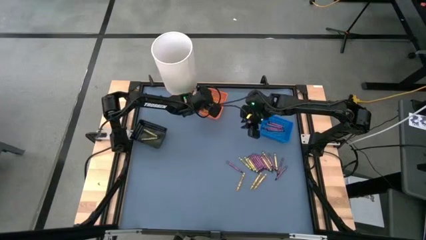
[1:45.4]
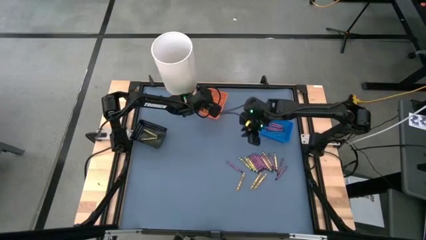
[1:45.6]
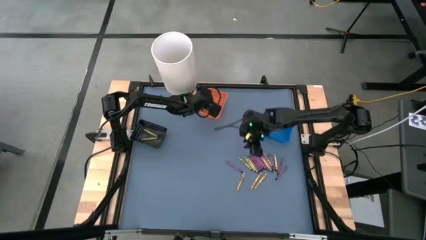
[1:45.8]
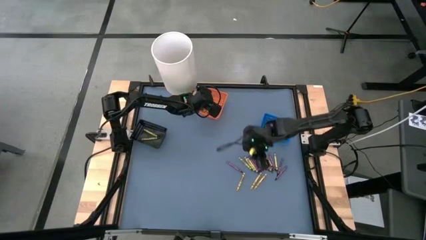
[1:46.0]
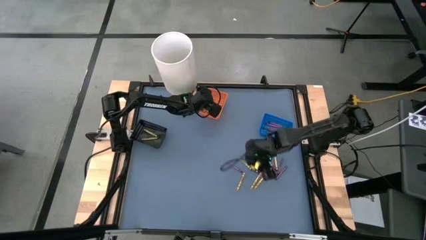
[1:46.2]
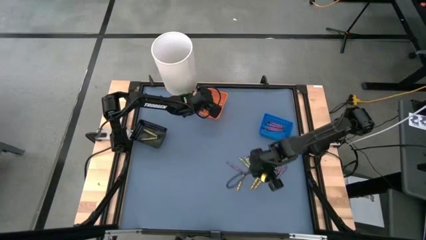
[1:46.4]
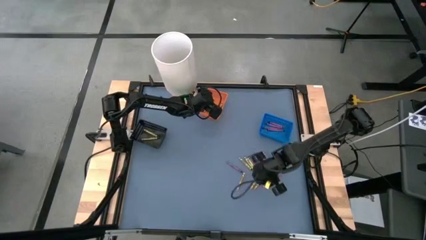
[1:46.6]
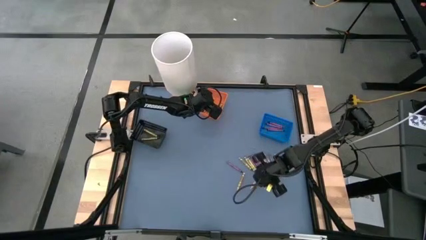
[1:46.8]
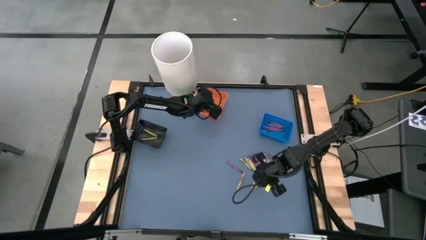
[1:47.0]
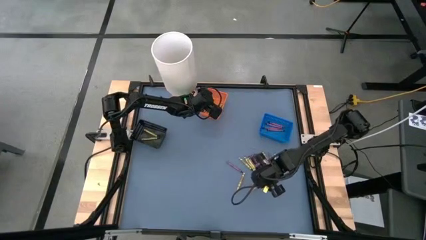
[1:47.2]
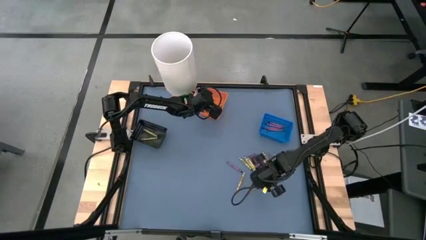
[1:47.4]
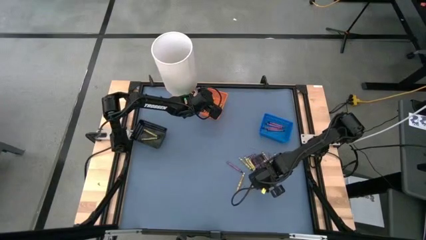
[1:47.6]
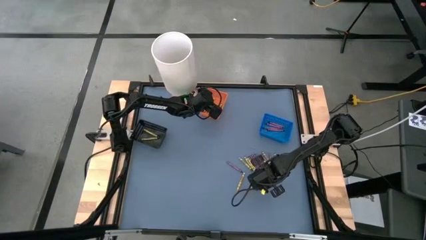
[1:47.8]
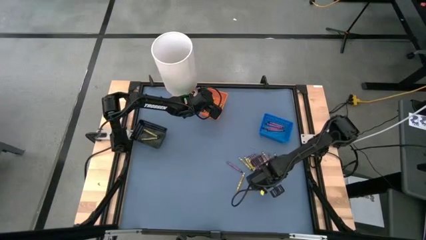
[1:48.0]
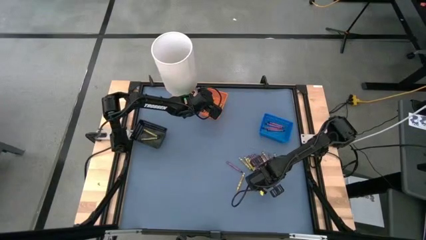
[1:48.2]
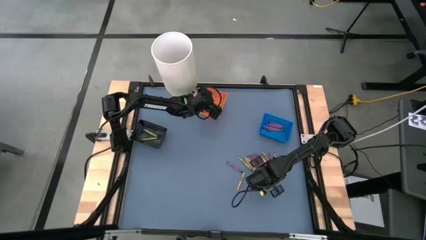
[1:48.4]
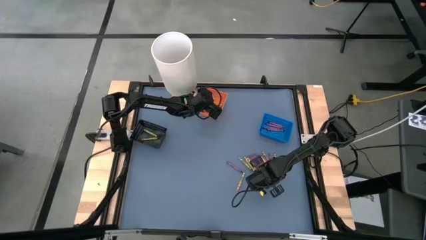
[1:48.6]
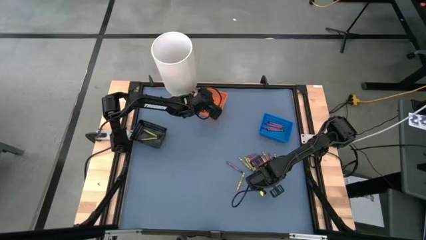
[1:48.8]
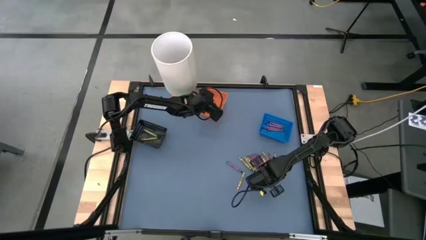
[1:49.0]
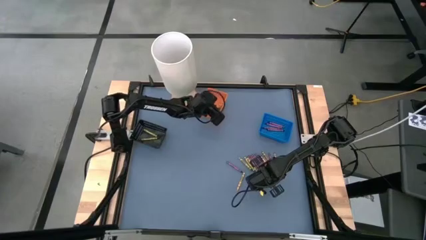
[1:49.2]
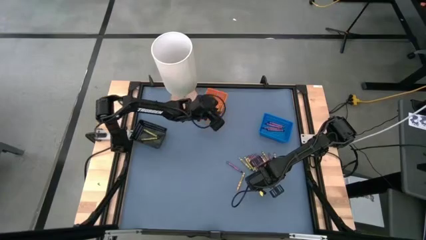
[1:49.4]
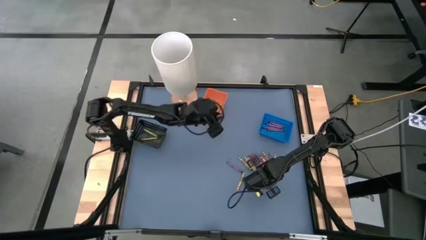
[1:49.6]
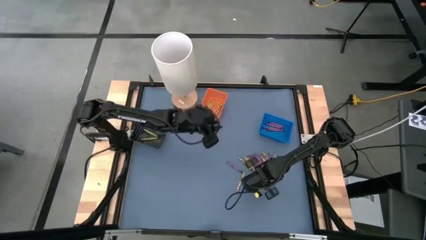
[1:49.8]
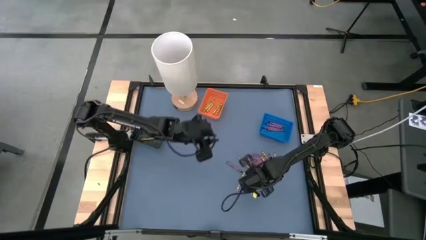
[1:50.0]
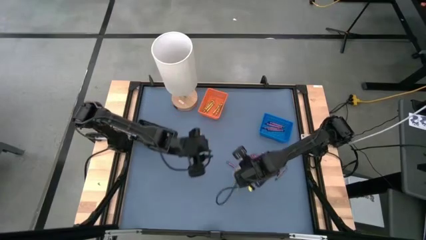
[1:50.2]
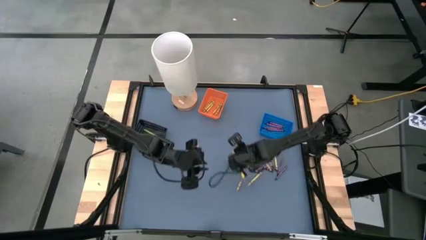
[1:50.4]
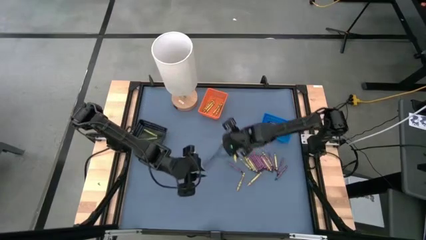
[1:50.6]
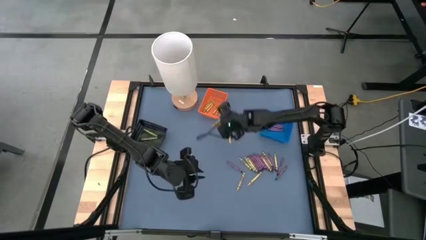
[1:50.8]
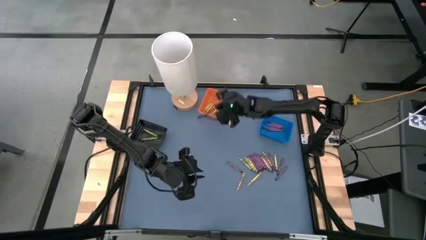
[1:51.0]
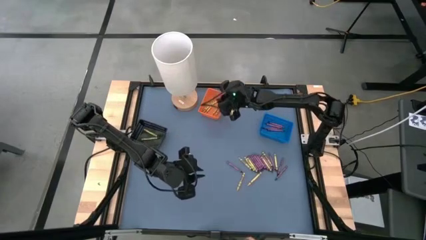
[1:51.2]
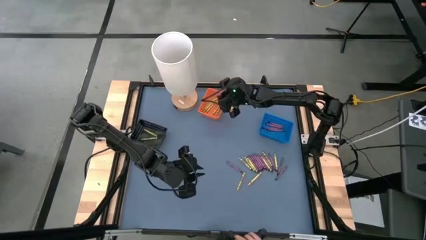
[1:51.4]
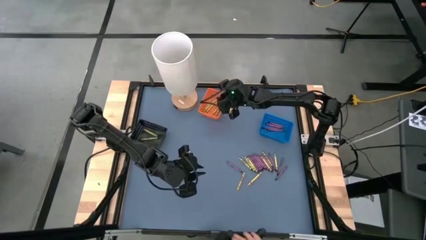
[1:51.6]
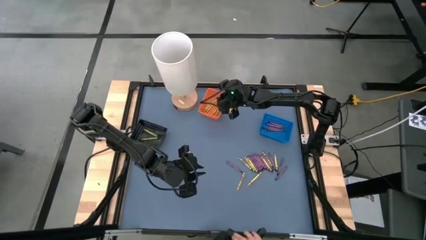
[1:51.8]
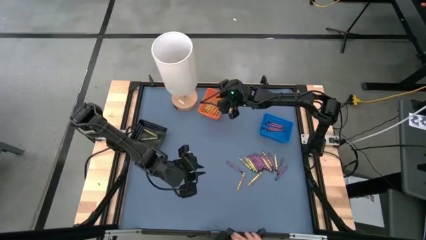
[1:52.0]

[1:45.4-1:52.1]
Task: Sort crayons
Put the yellow crayon into the orange basket

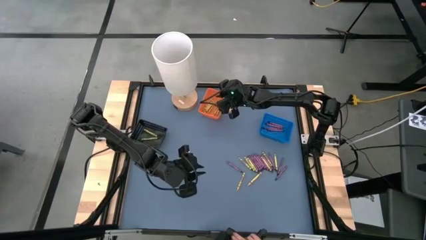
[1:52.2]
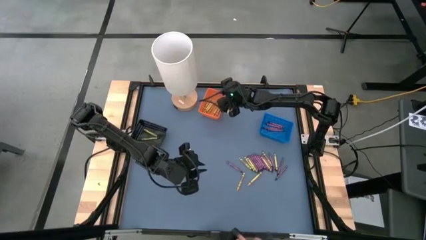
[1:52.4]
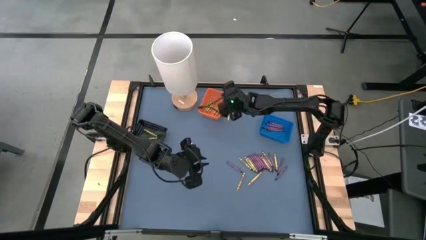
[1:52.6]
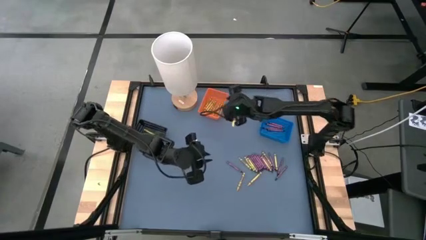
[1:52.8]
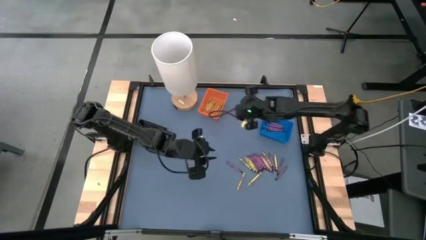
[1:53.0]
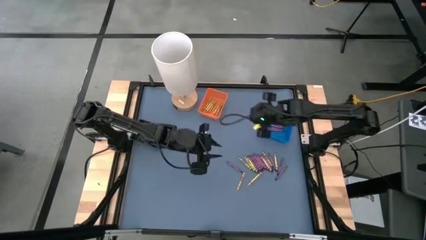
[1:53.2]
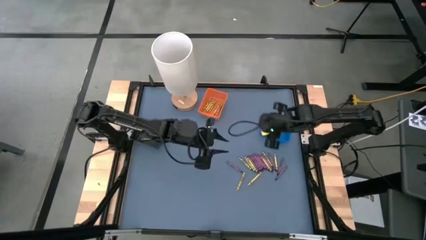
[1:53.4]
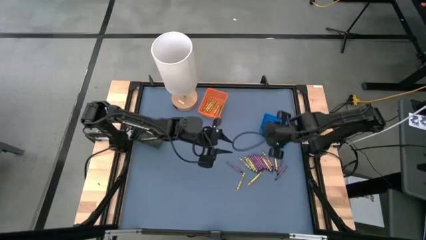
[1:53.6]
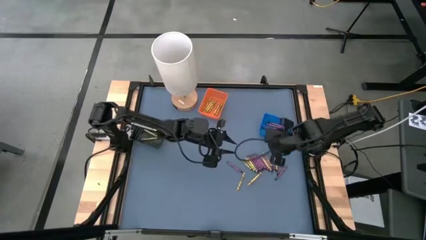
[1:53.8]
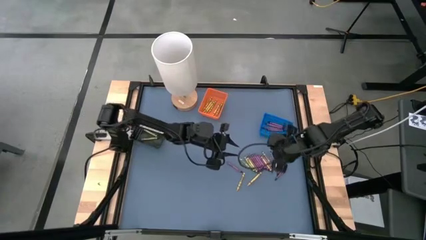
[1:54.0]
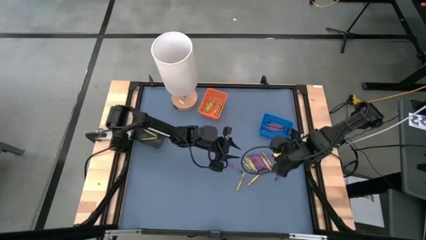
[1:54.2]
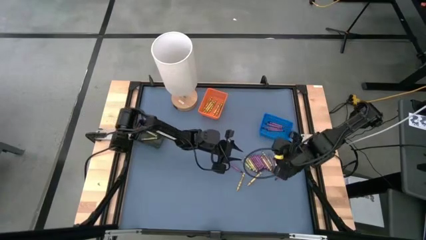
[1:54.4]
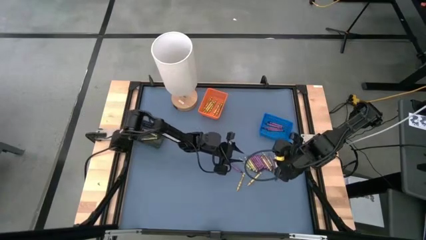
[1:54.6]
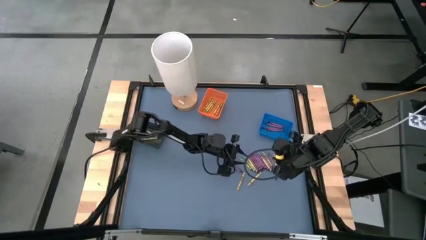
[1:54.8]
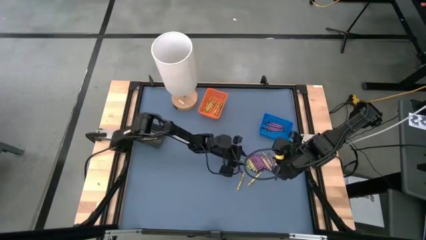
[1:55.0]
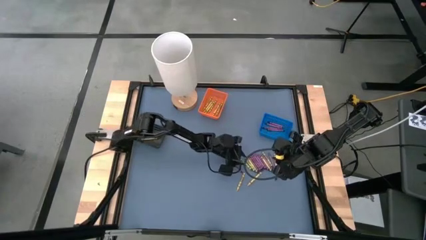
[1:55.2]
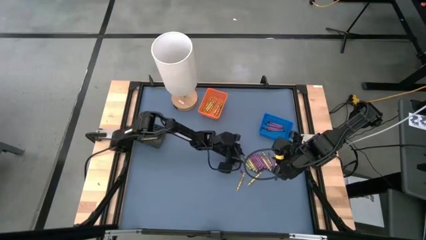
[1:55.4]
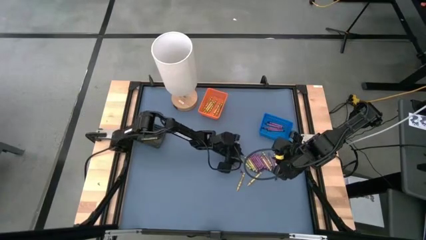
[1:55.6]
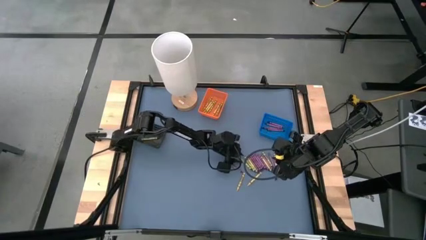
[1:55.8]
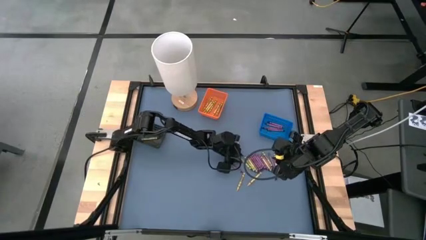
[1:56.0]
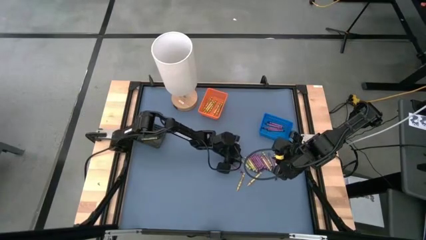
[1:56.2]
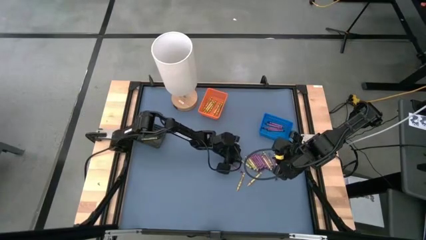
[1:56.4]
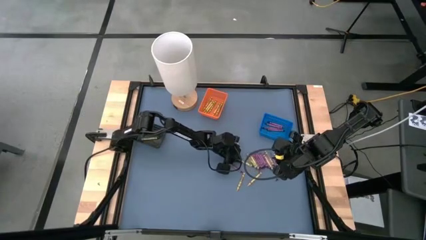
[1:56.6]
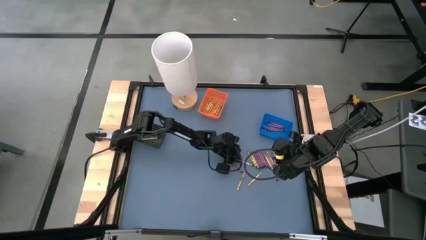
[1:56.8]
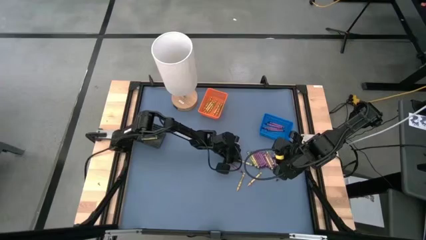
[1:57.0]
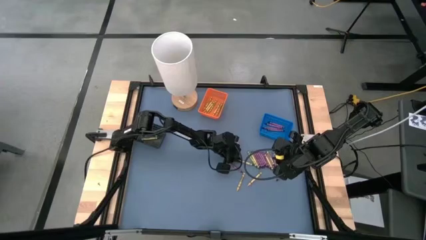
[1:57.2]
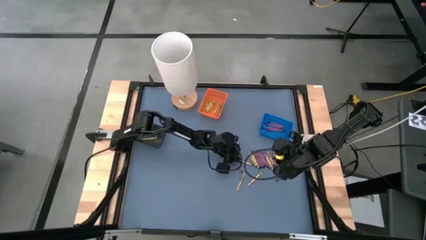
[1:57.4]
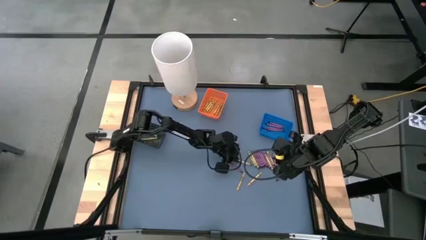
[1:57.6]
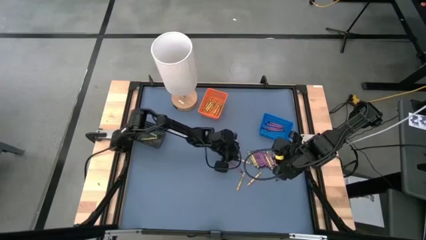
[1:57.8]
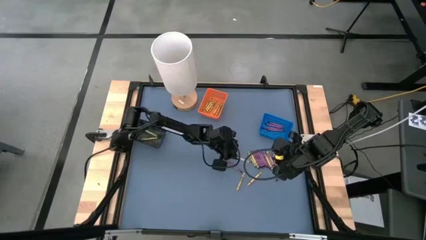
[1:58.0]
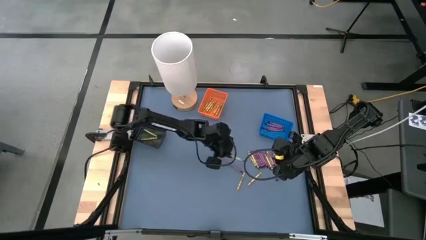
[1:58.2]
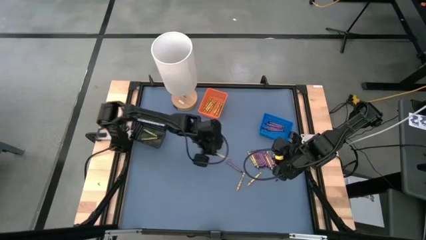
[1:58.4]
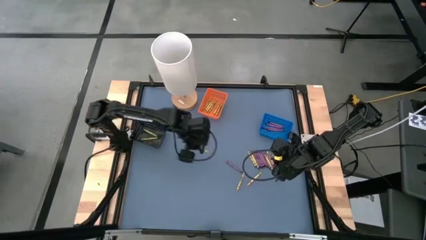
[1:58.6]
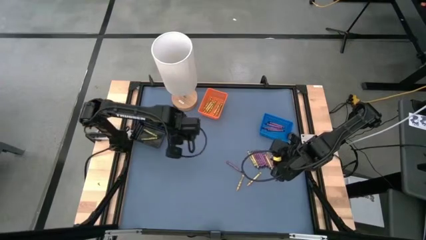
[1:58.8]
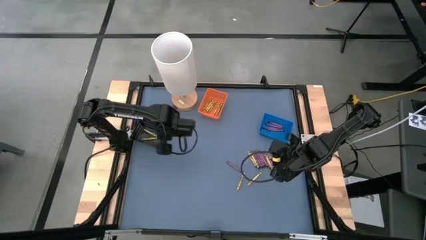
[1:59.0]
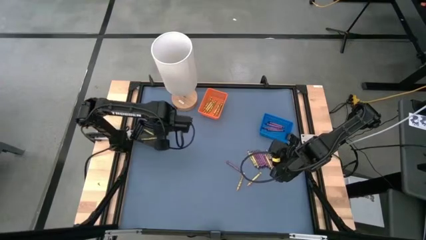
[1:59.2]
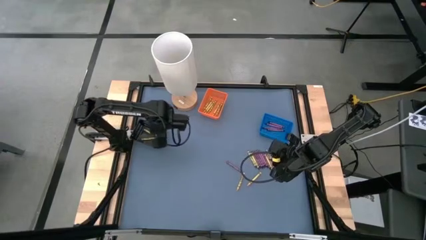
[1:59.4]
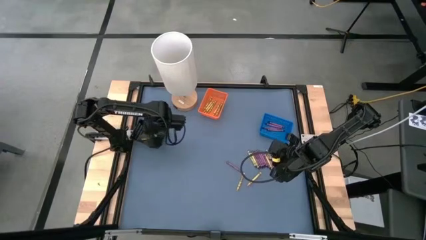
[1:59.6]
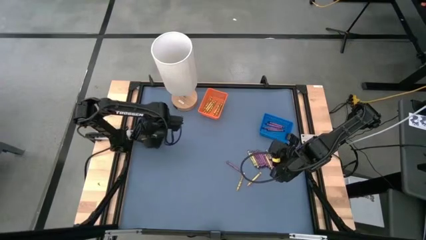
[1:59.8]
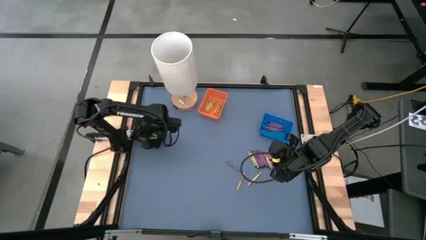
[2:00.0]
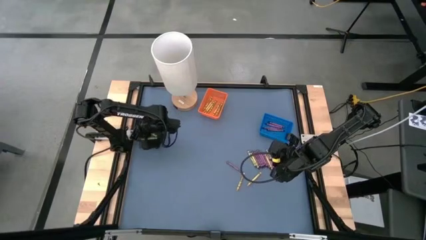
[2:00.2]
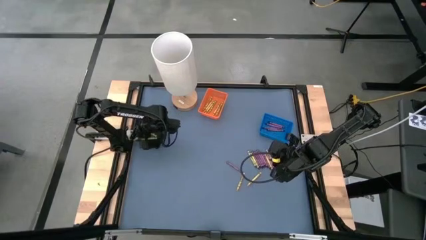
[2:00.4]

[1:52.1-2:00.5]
Put the green crayon into the black basket
